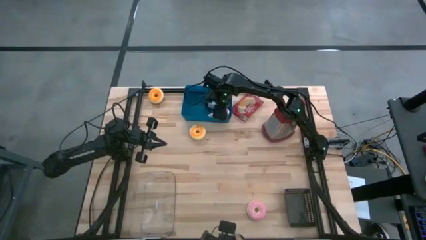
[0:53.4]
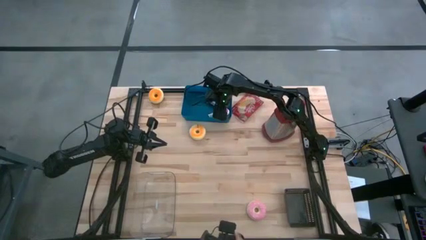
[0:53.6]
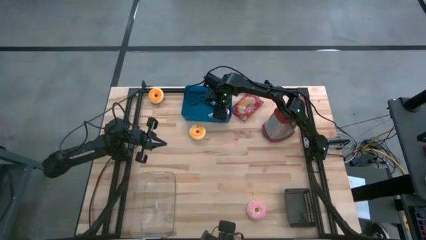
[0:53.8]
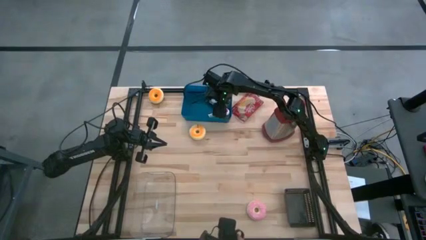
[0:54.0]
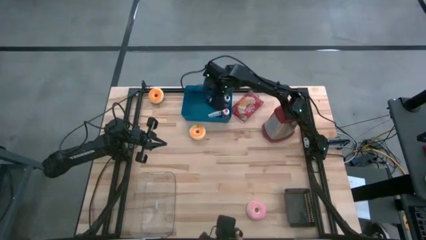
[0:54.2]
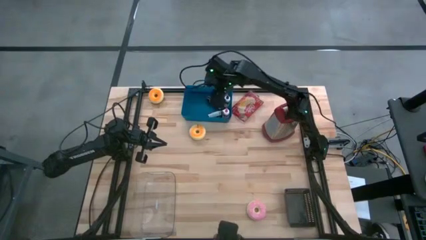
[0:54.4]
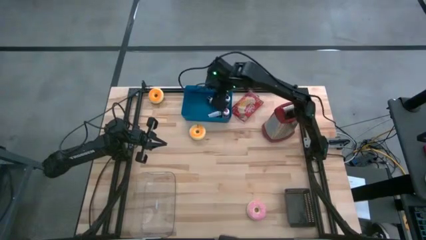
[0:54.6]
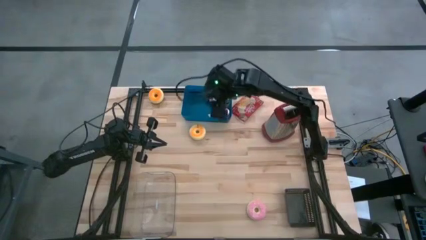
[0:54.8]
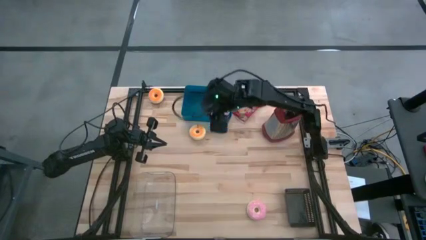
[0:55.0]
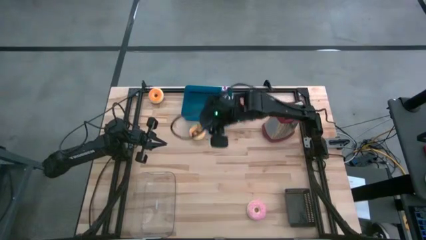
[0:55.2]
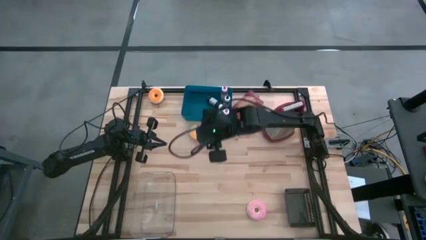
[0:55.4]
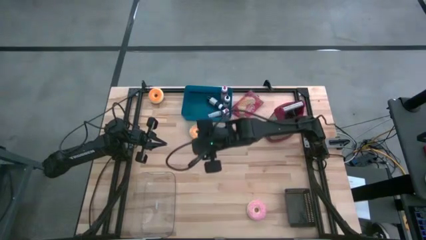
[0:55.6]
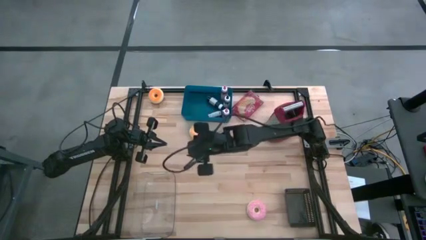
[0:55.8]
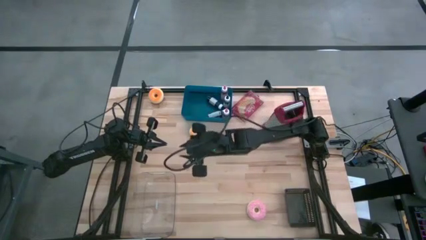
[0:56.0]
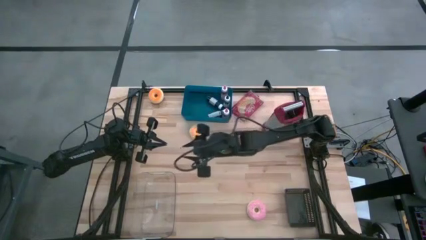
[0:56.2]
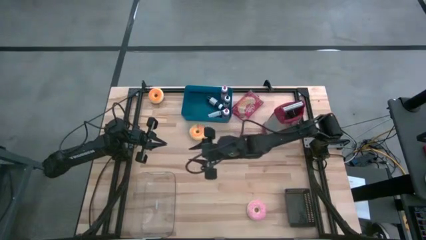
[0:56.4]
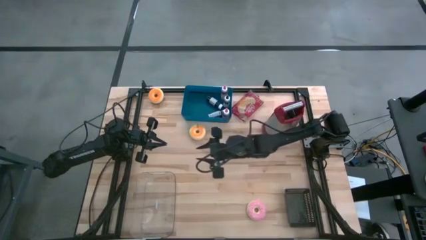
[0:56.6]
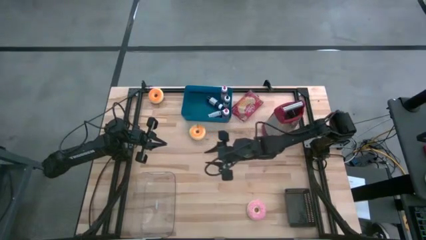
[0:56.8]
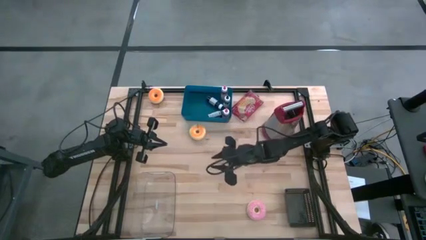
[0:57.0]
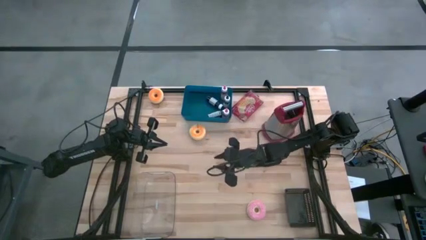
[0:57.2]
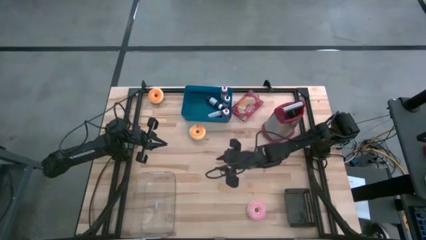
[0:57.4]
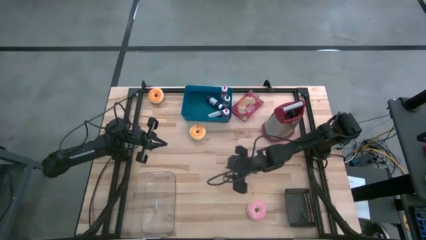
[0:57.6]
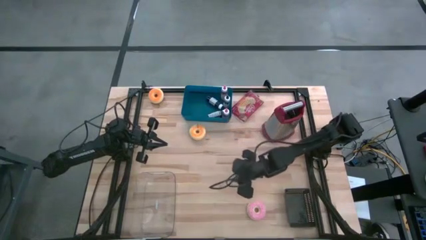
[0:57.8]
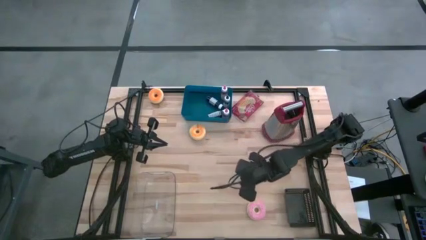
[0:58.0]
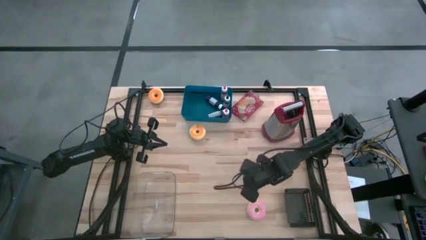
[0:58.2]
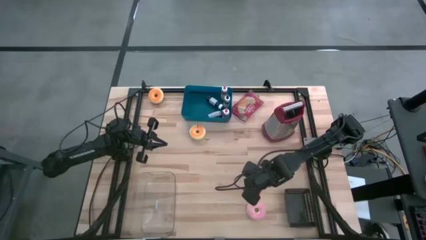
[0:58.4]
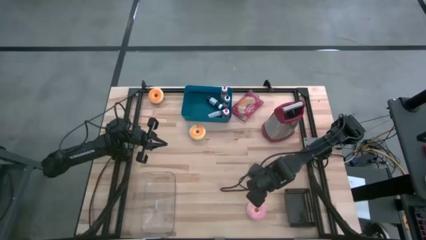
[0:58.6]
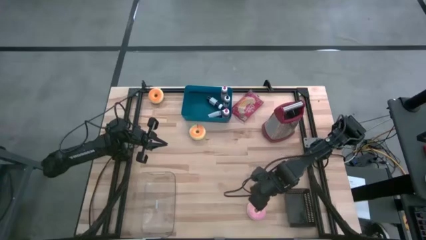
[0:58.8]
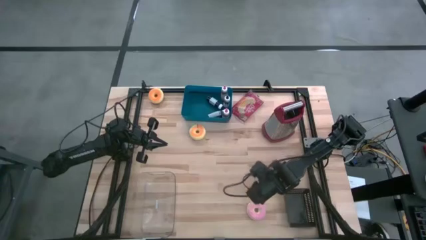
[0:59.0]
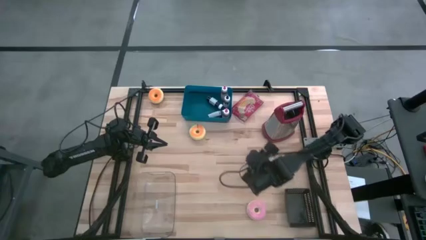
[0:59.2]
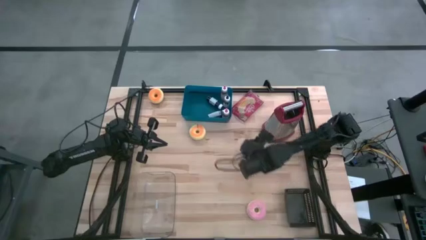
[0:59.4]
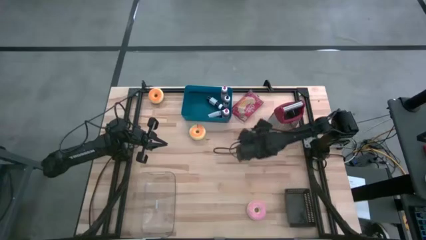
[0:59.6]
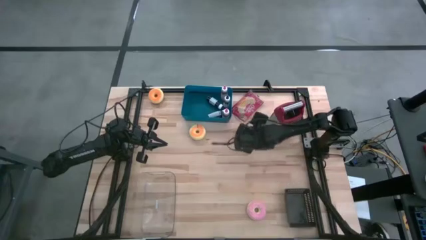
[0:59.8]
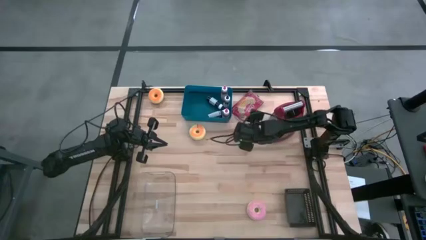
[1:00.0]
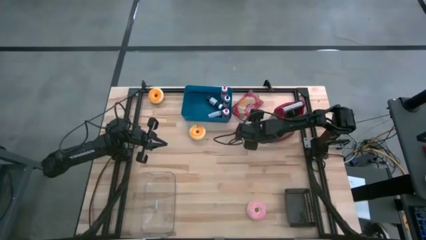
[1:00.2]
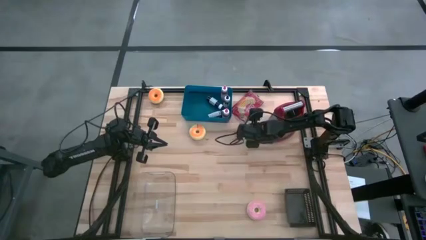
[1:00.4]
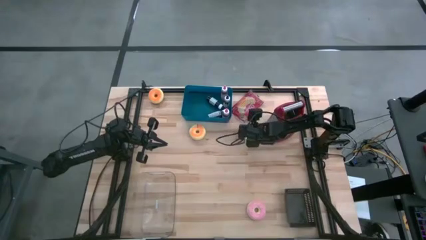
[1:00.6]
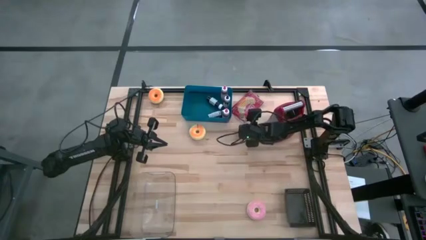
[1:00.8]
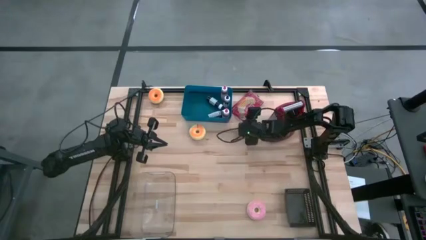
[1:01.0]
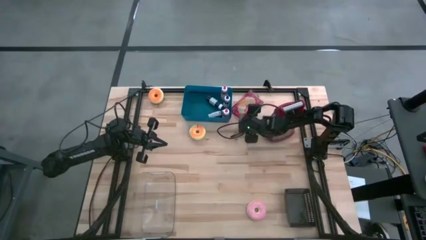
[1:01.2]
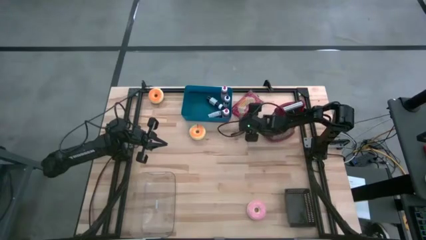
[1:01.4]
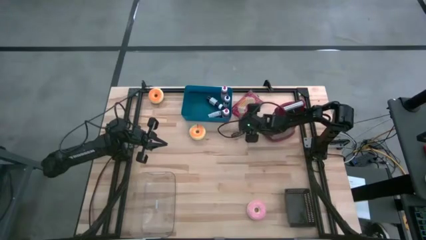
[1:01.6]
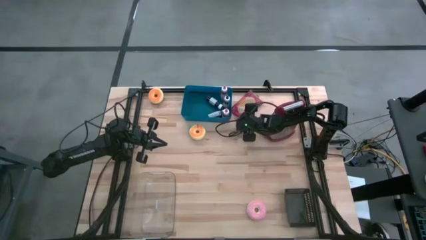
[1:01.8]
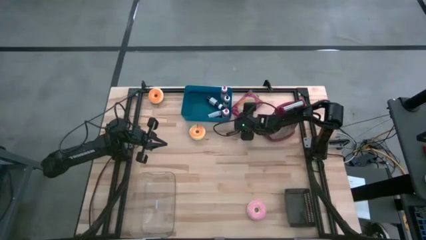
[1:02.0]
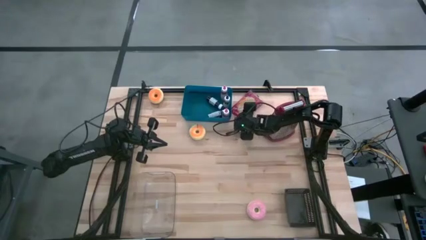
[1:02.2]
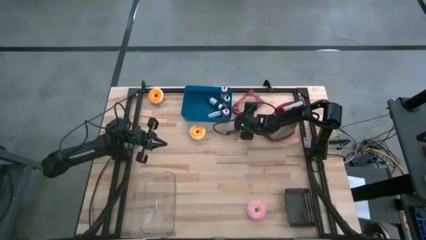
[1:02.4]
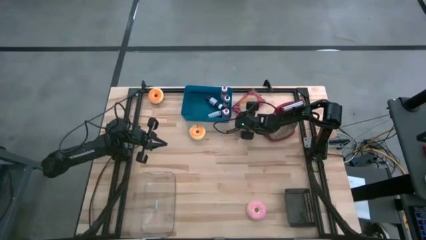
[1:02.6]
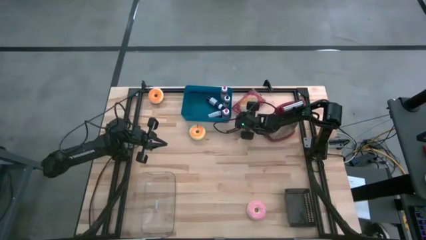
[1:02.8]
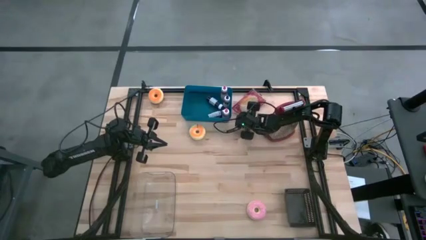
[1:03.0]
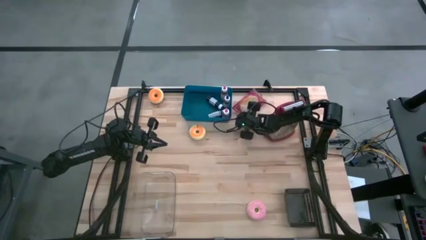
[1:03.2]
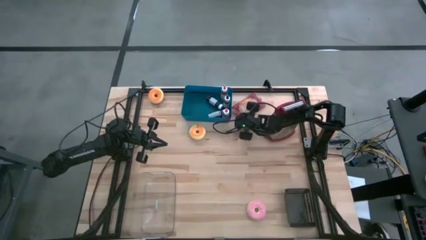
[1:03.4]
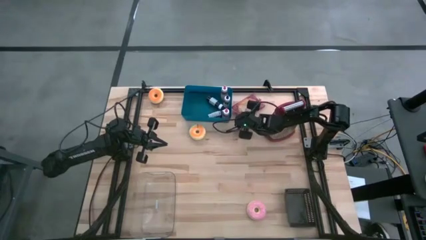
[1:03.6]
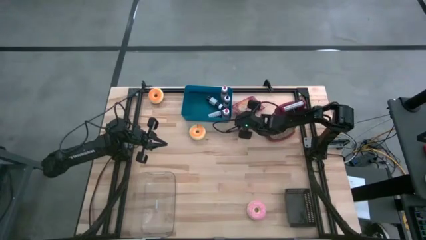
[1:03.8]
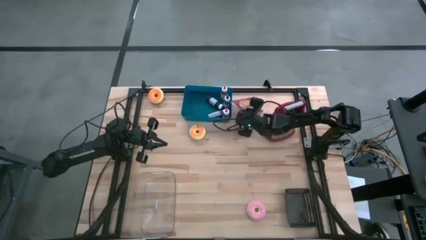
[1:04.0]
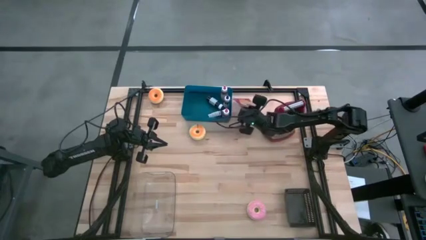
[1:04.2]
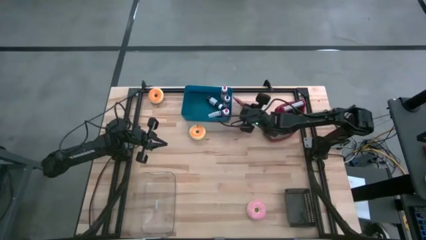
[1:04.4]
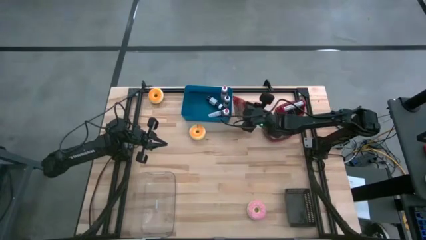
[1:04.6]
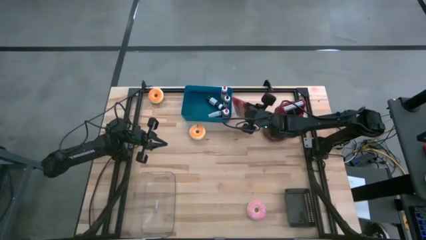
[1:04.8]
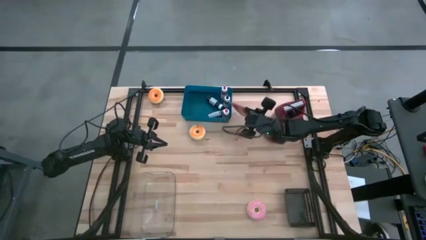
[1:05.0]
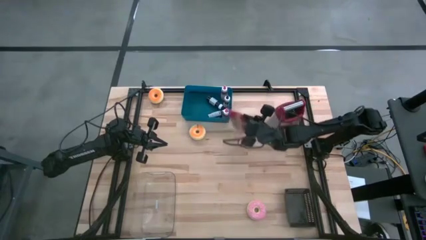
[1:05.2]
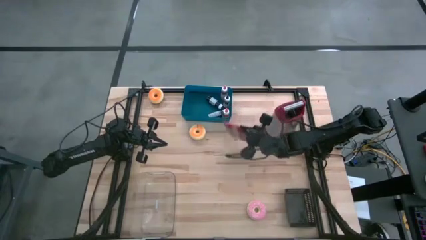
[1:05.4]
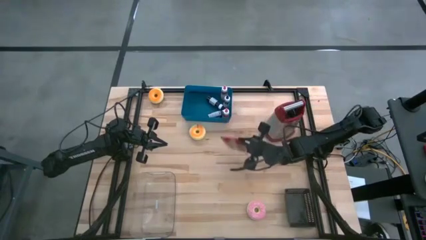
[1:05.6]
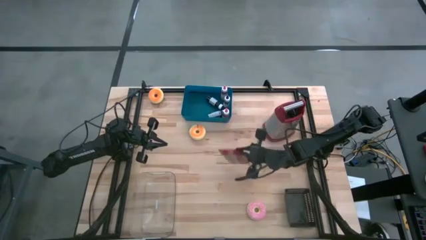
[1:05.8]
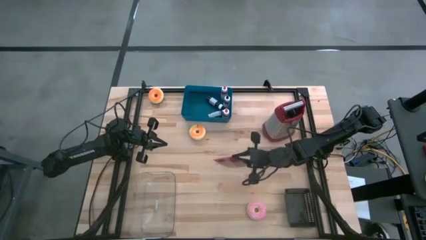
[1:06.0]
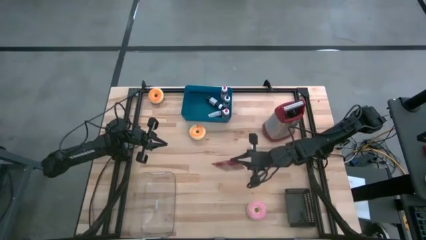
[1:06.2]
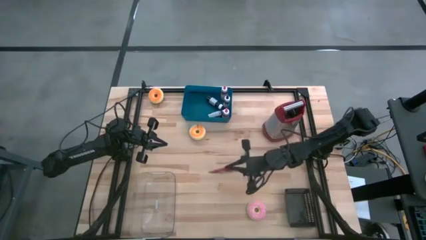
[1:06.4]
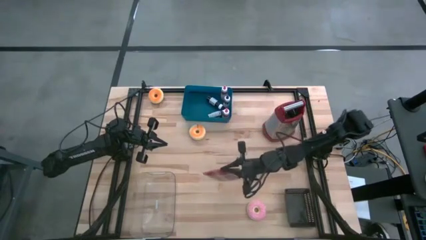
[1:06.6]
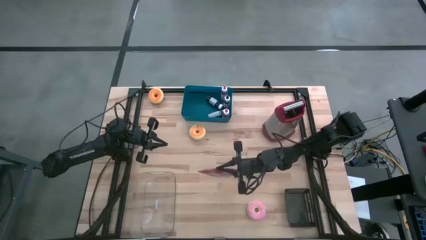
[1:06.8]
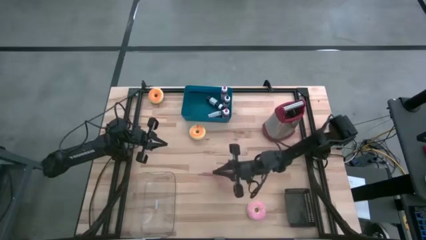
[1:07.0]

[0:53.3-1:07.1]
Task: Pick & Place Food Item
Put the red popcorn bag into the transparent bin
